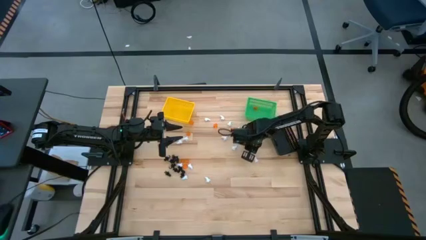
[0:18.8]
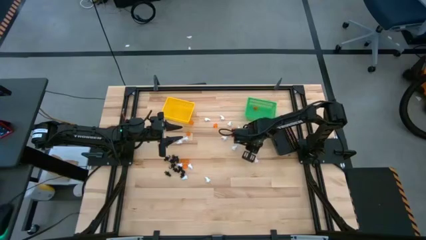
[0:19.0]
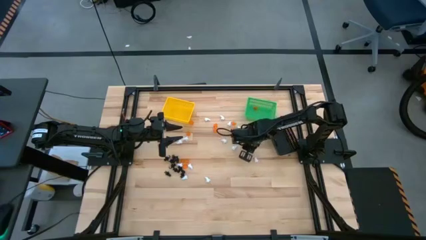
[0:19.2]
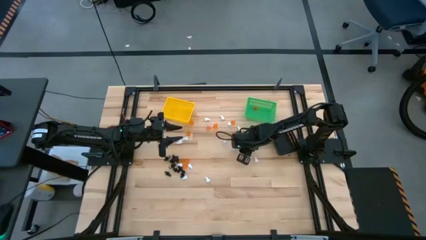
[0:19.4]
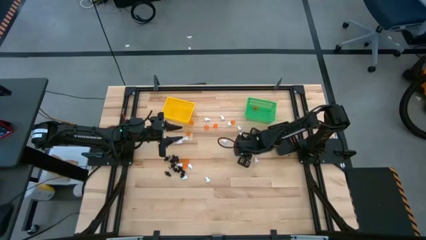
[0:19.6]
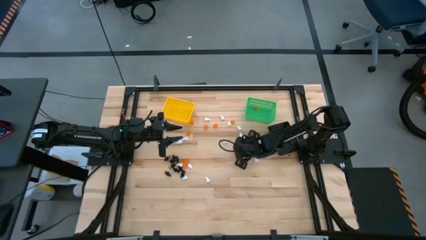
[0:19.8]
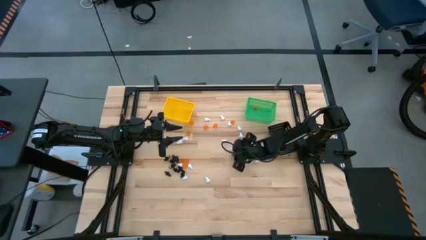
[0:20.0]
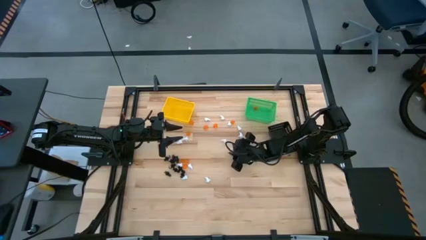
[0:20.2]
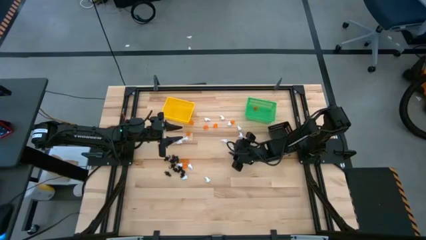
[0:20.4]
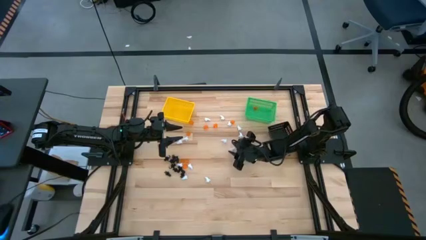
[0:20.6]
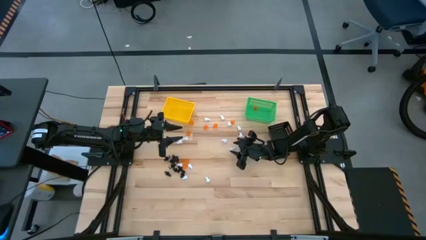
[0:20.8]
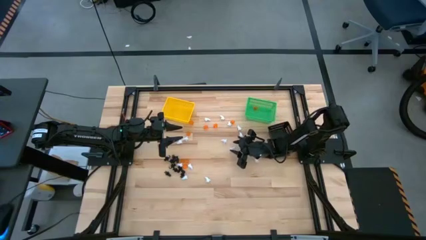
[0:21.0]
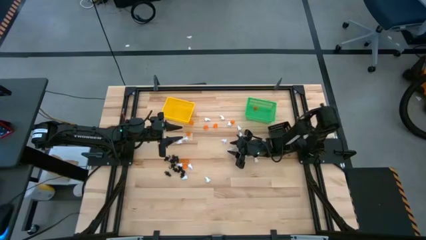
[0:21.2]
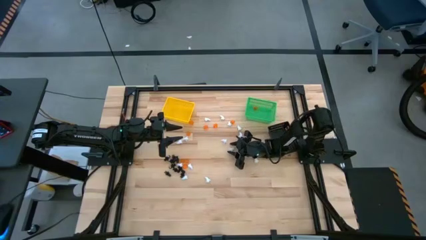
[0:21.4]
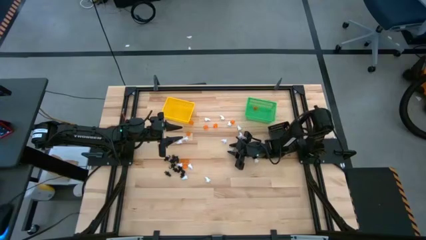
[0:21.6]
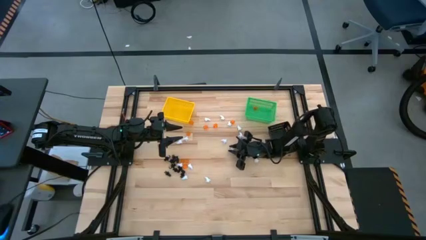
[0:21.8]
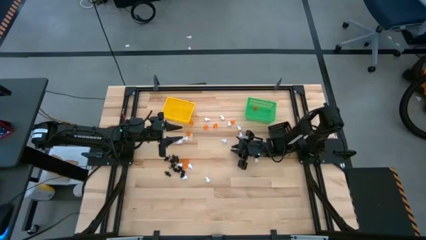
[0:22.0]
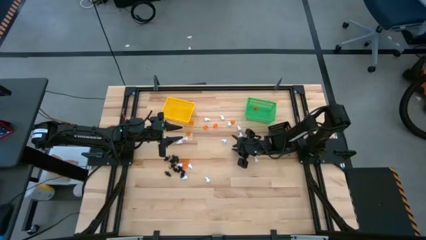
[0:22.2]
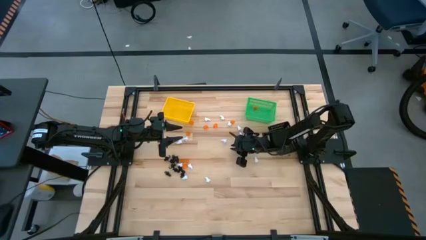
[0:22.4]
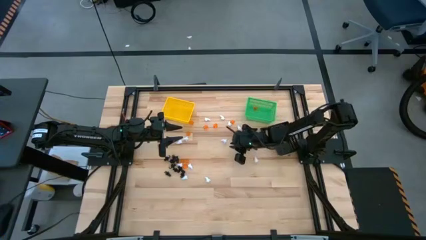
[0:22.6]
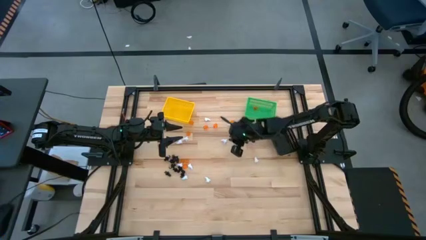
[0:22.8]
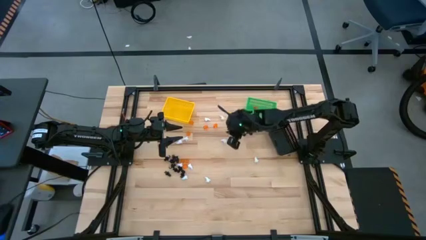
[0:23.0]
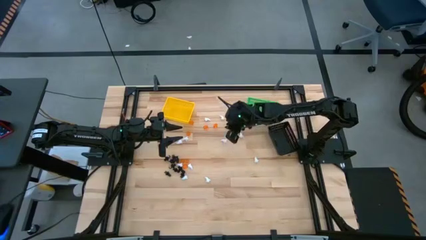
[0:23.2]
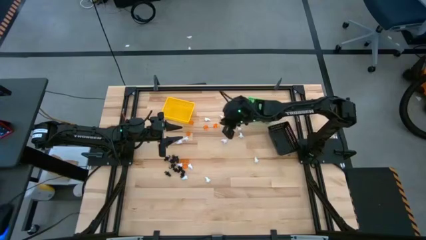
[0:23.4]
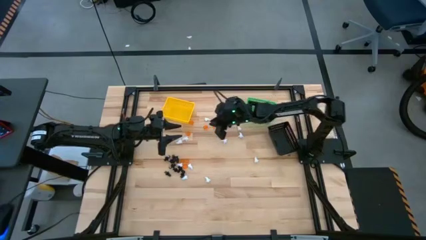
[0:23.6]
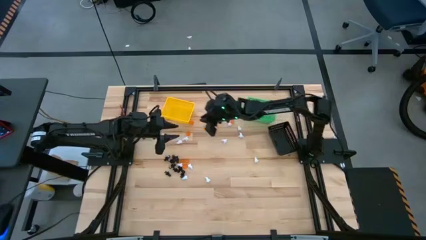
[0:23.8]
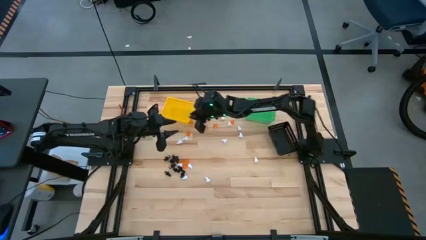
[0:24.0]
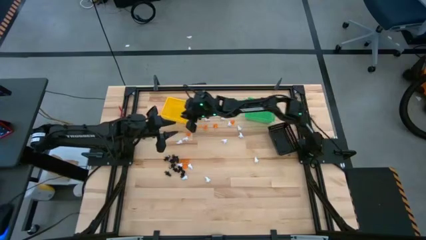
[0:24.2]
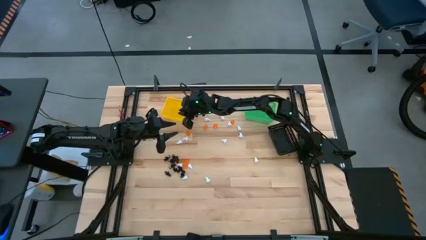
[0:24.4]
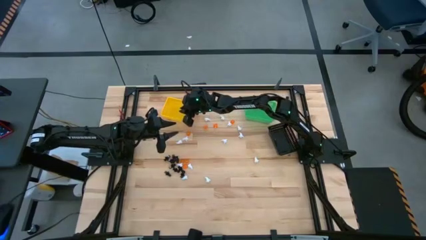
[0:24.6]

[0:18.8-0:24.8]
Task: Sort Halloween decoration
Put the white ghost toy into the yellow bin

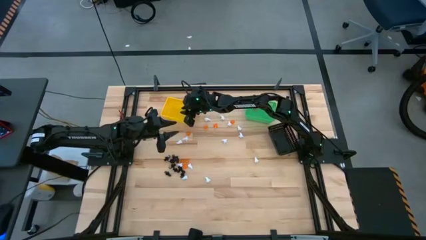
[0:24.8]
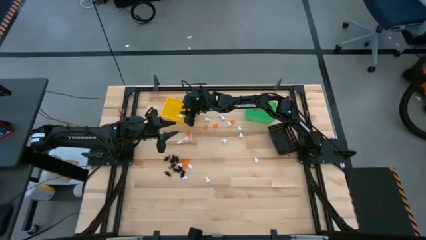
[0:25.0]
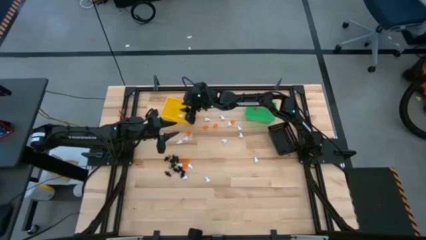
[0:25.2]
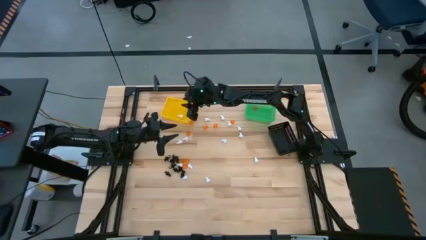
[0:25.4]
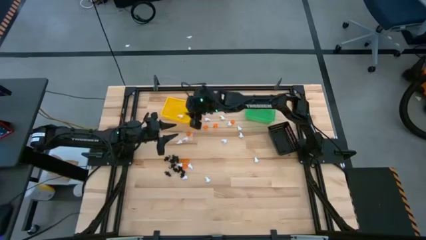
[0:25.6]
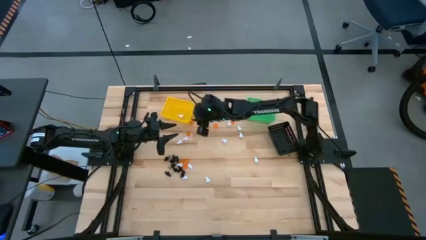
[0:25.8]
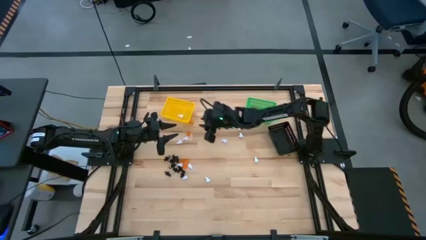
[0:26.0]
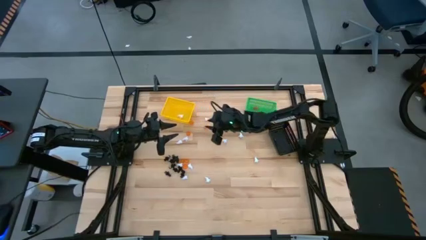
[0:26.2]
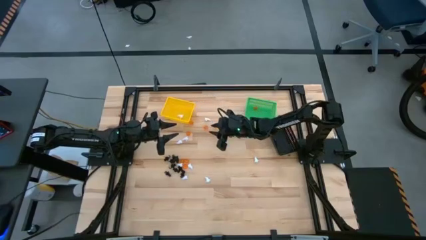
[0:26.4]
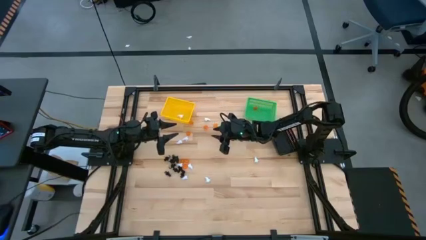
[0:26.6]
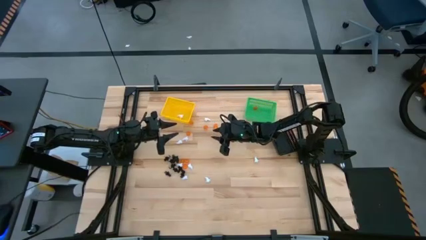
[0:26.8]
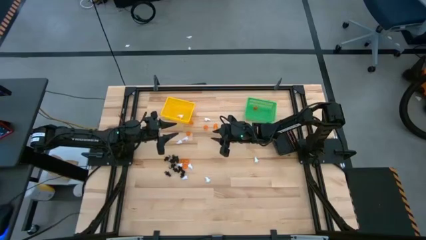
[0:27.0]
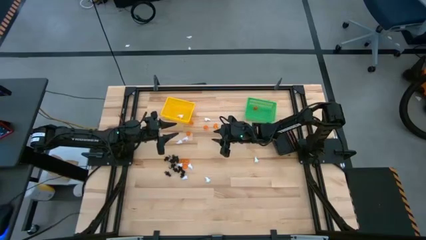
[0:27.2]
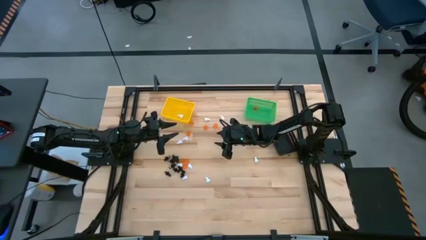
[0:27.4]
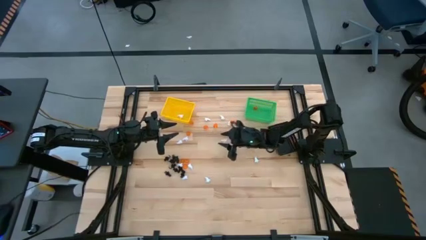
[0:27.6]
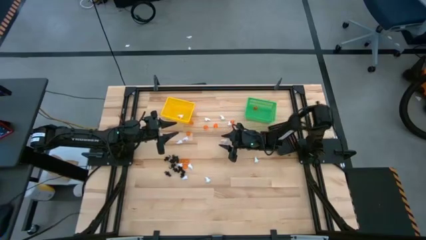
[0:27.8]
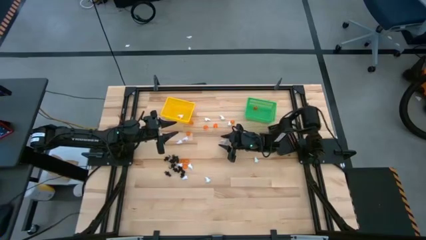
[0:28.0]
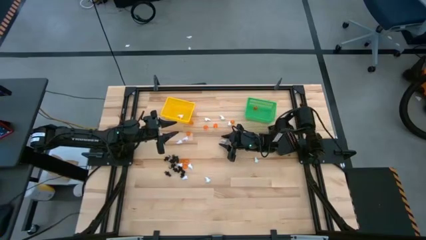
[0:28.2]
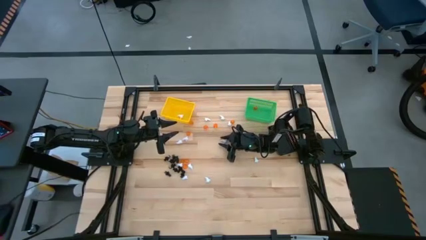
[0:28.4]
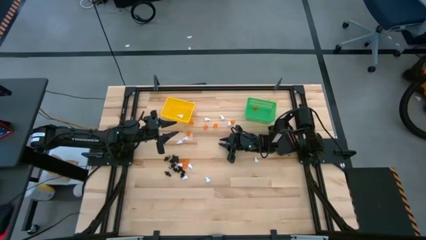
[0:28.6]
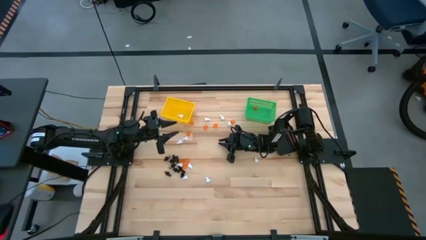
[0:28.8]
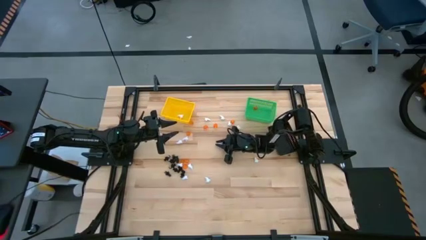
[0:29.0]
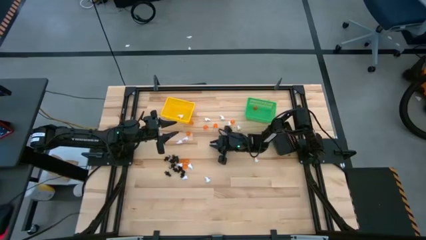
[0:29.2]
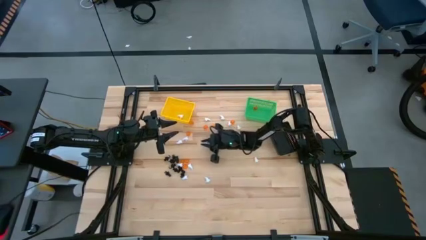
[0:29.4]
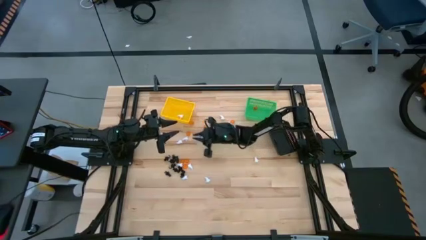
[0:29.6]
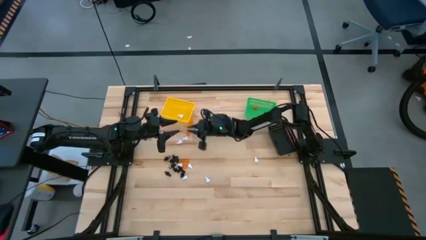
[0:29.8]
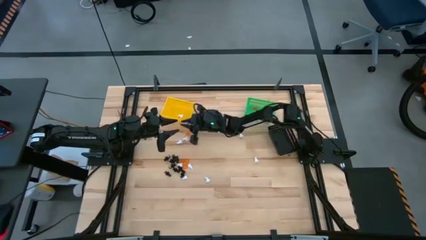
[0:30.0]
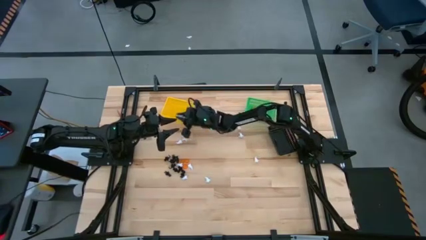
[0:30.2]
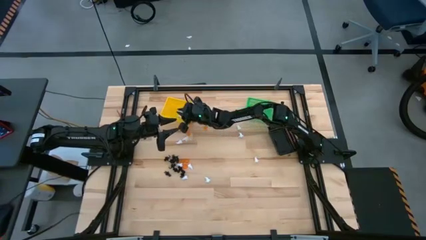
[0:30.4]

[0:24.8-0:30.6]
Put the white ghost toy into the yellow bin

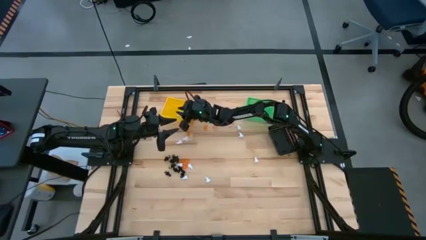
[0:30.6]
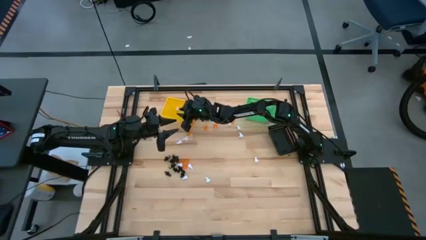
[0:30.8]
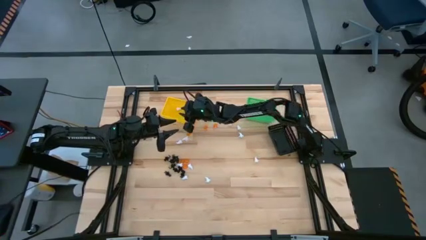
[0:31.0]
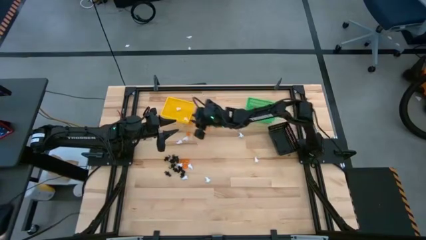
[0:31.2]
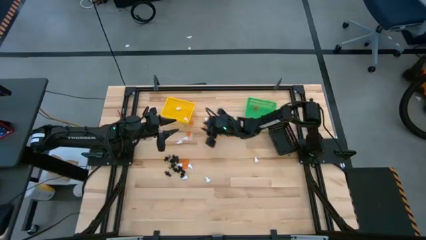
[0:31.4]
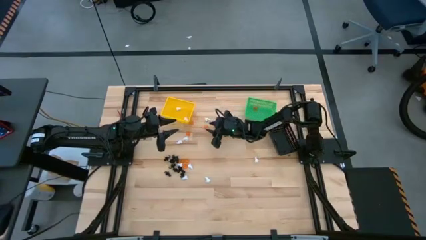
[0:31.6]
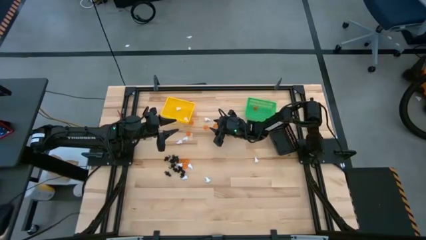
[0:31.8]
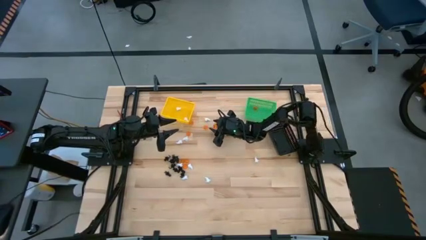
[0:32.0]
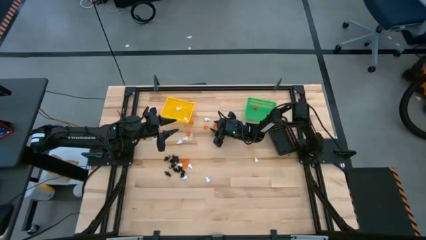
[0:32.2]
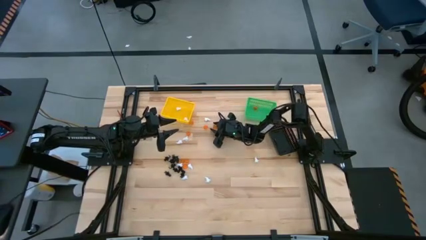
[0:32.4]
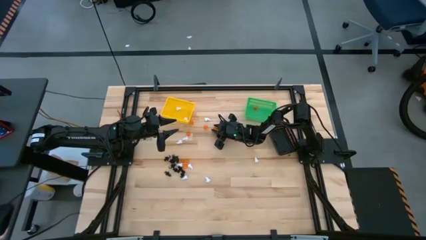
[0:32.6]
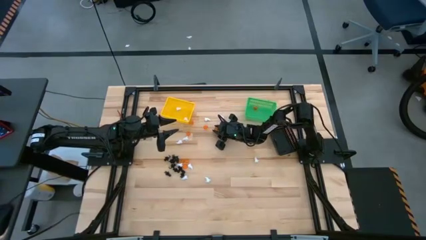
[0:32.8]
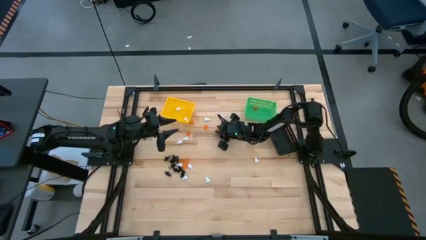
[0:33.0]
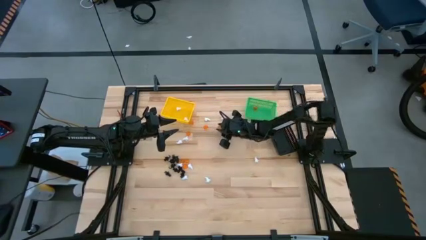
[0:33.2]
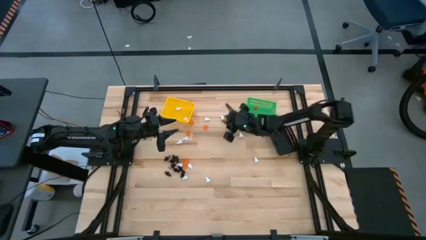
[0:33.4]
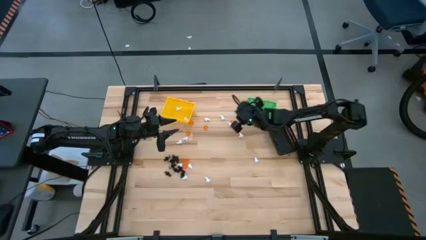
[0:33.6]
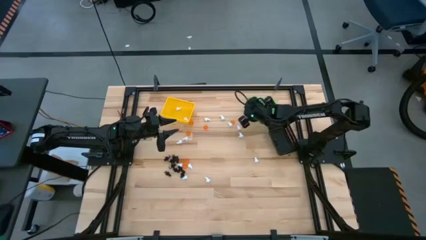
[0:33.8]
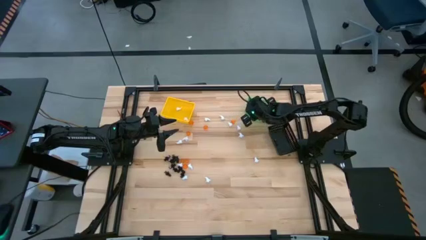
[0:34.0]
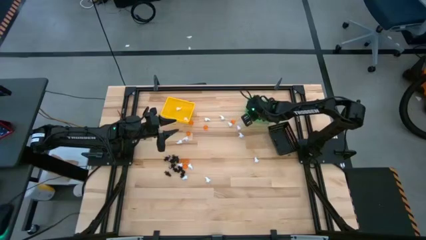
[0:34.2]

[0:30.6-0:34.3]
Put the orange pumpkin toy into the green bin

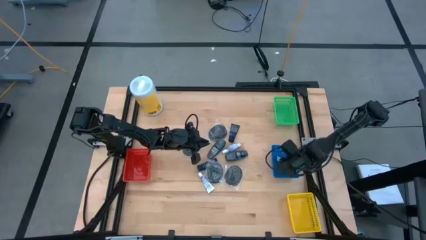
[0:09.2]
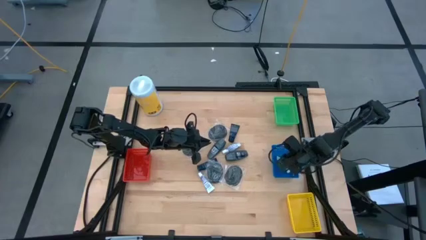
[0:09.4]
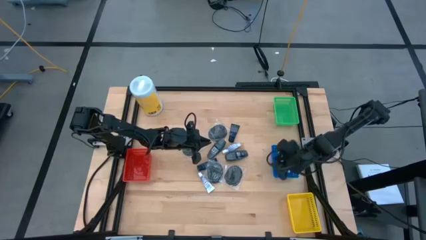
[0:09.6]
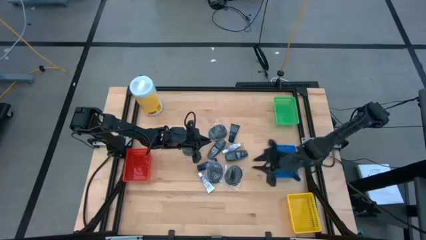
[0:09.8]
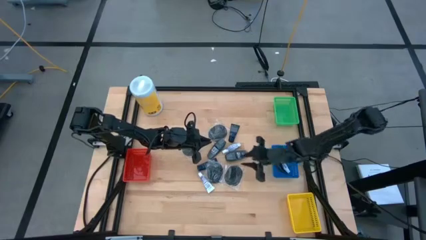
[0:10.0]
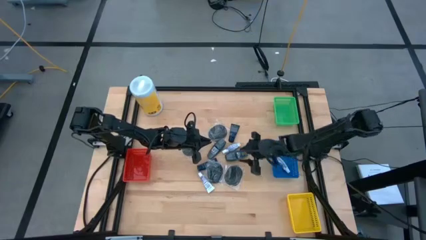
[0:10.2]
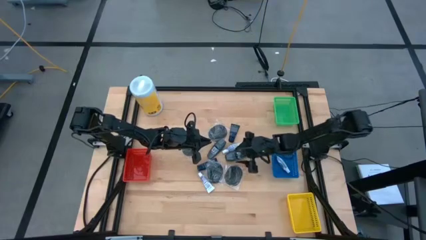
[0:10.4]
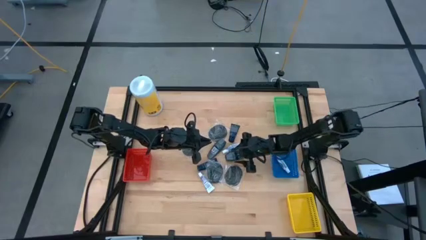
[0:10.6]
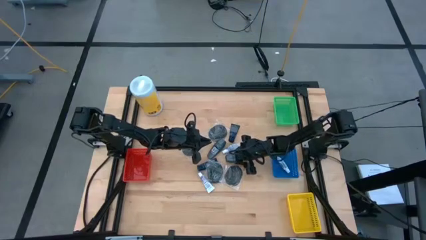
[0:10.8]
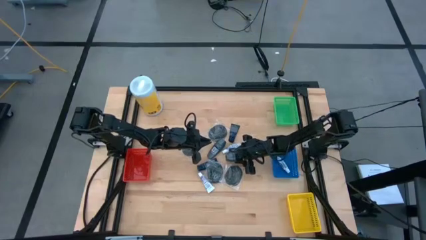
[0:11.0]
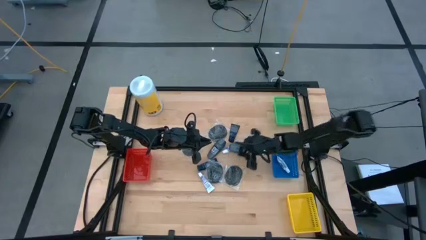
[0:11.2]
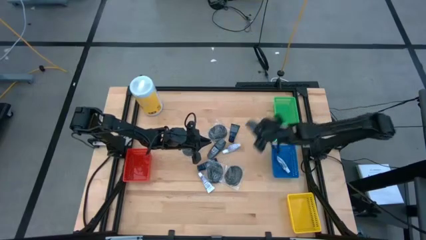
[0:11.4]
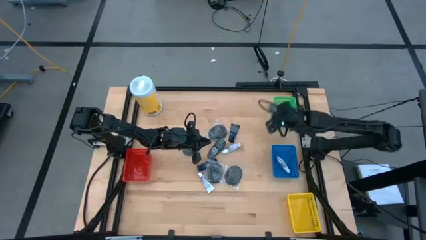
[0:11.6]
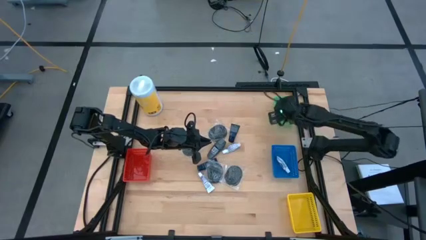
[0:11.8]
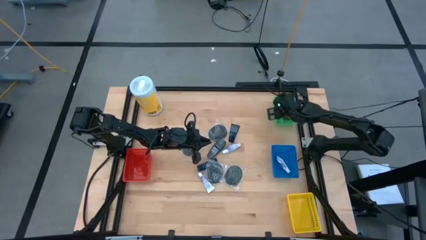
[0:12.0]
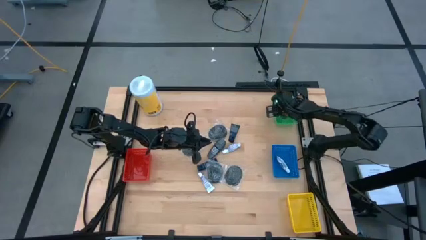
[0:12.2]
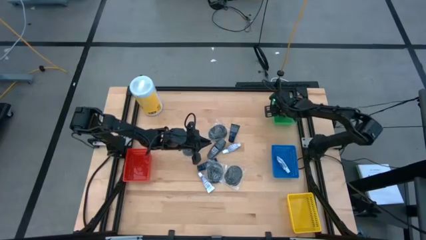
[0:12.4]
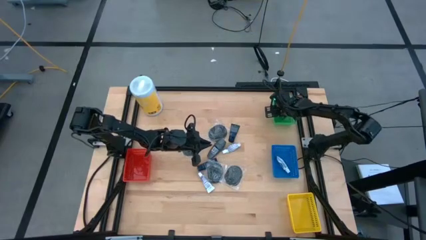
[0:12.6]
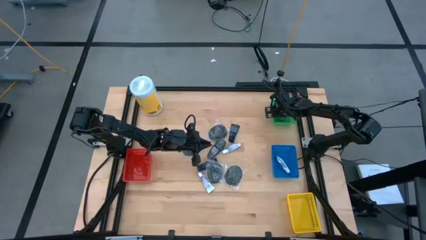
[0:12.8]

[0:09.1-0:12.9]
Task: Pick & Place Travel size toiletries
Put the deodorant into the green bin
